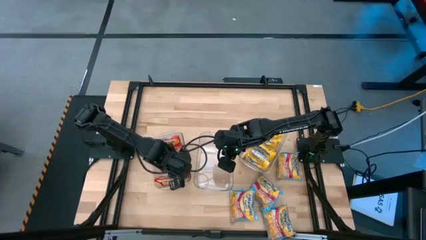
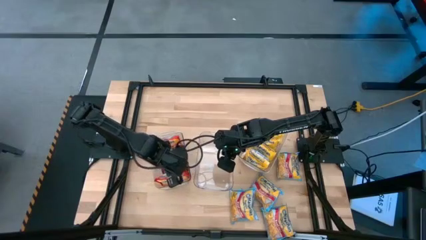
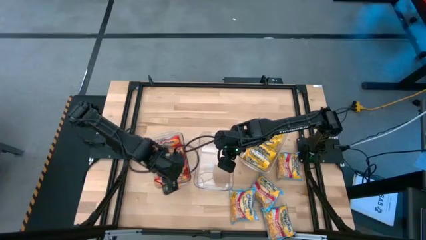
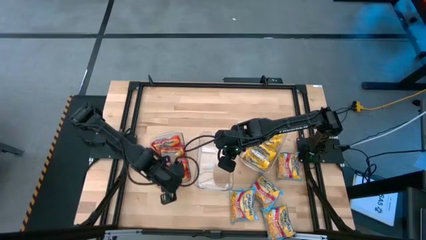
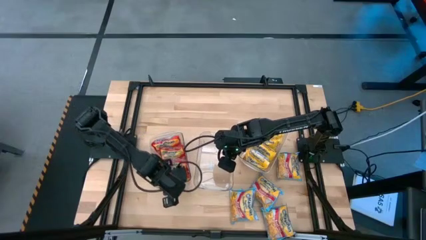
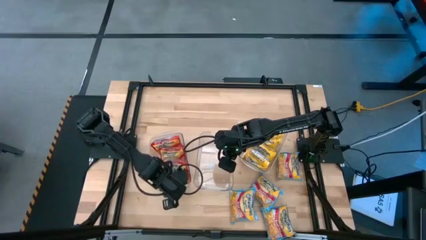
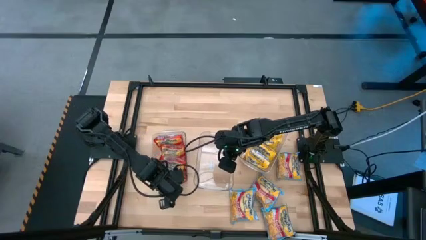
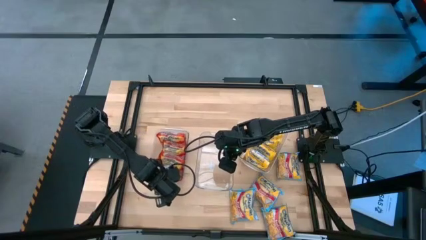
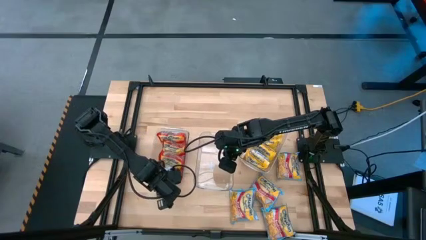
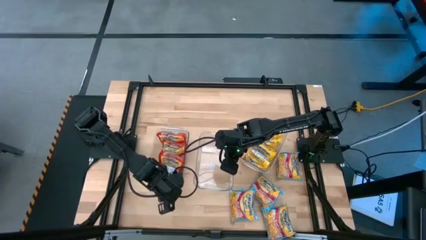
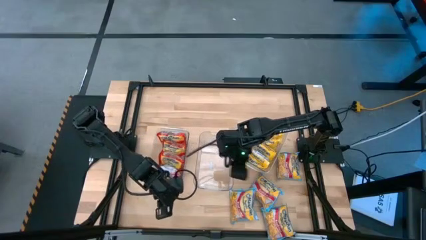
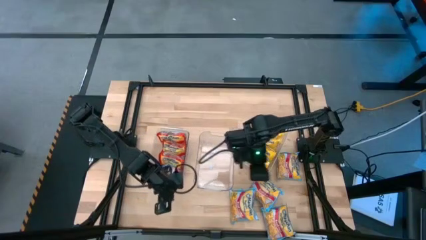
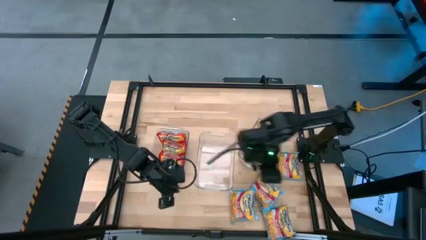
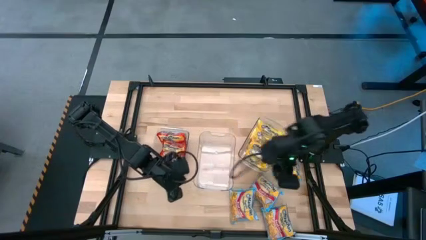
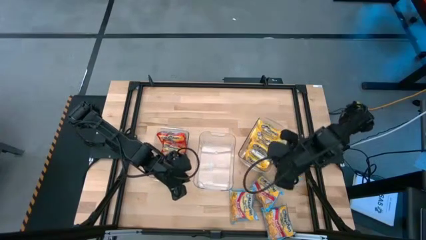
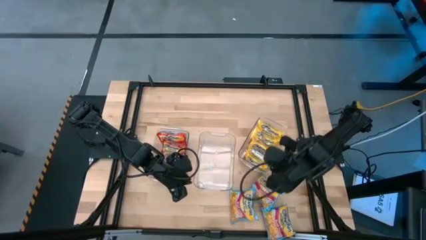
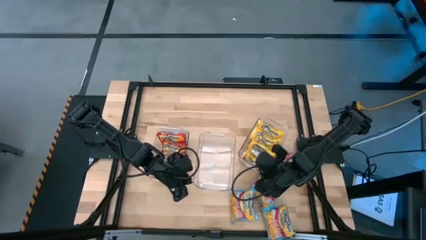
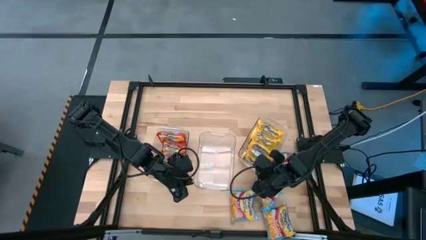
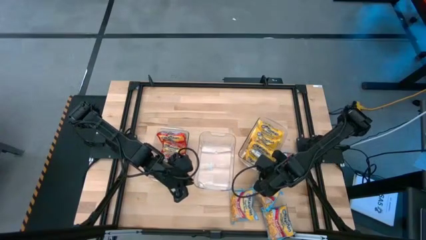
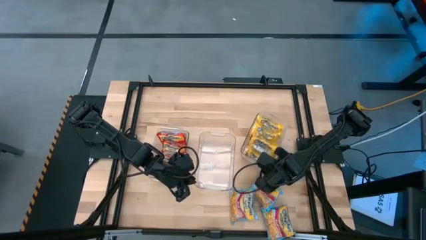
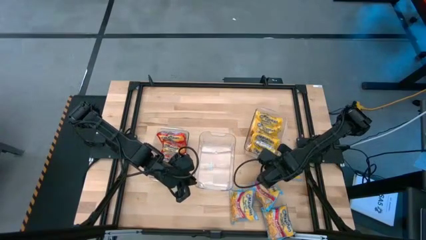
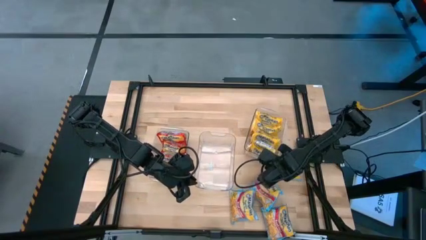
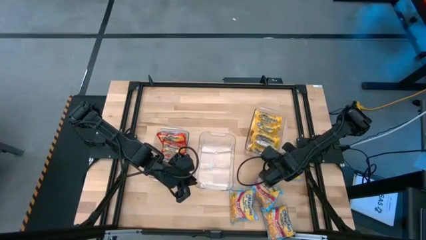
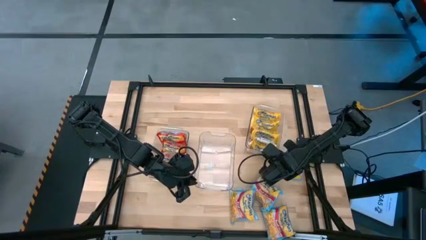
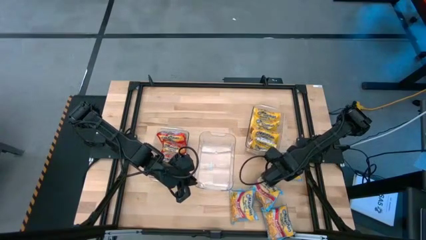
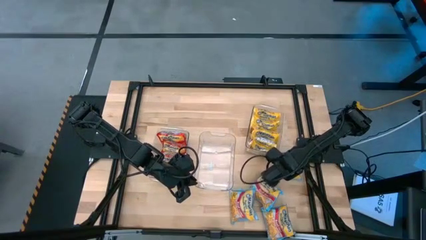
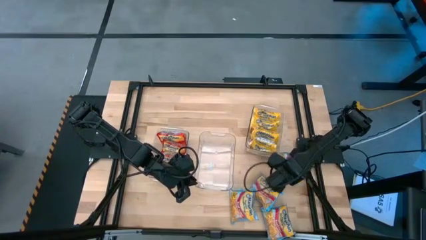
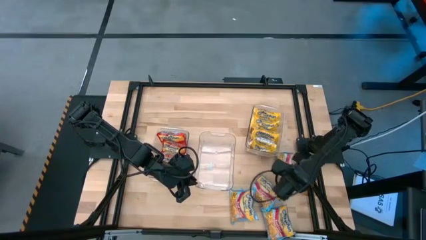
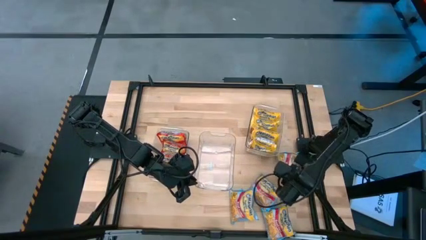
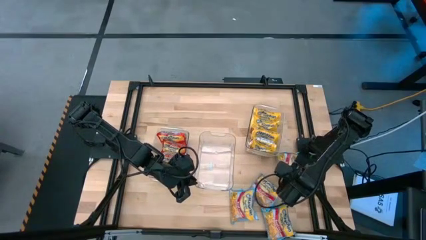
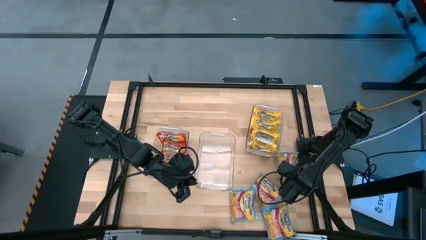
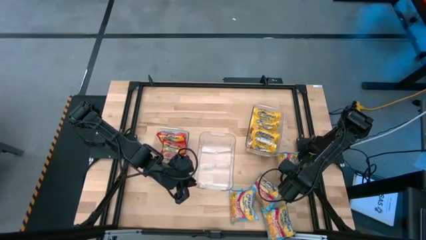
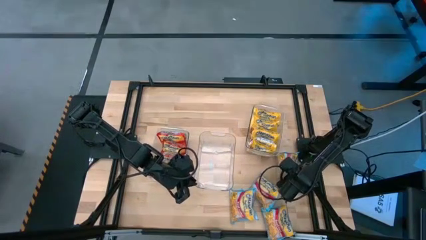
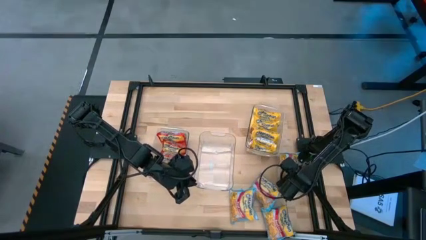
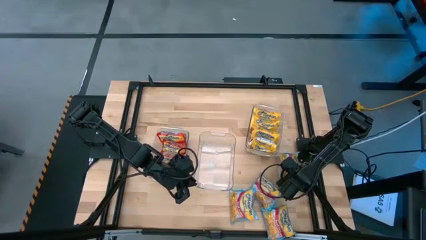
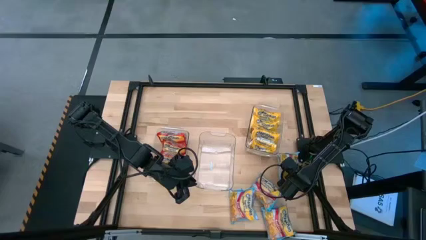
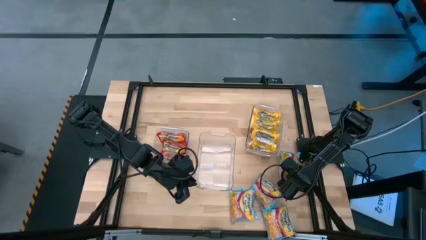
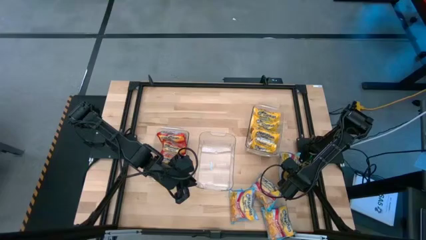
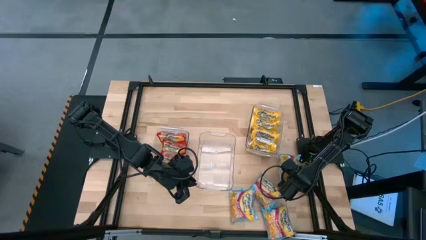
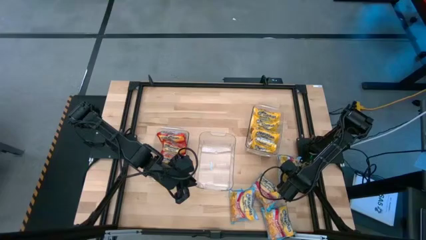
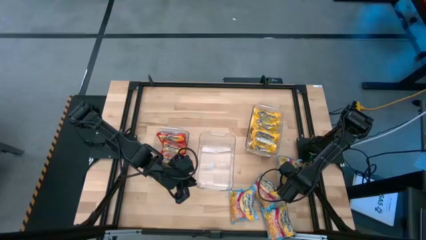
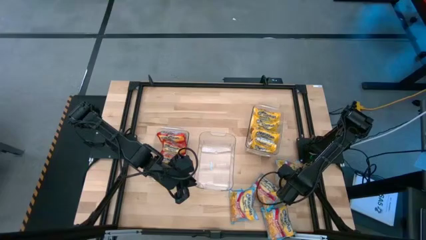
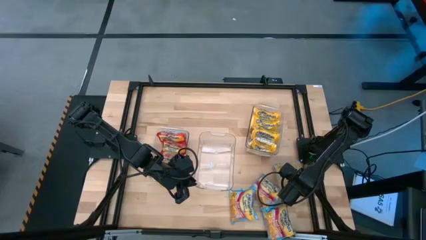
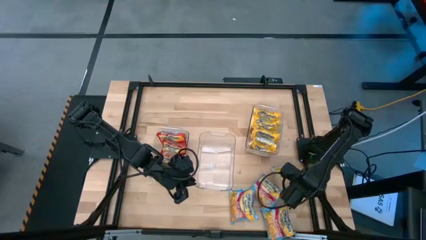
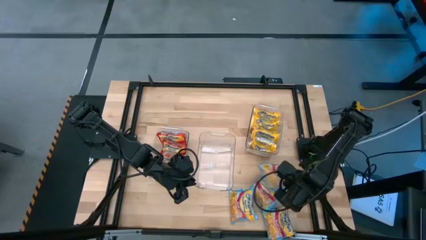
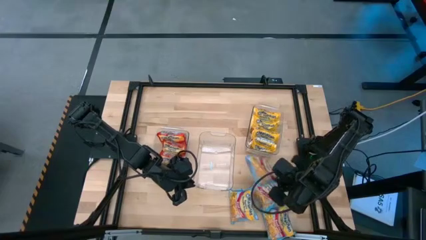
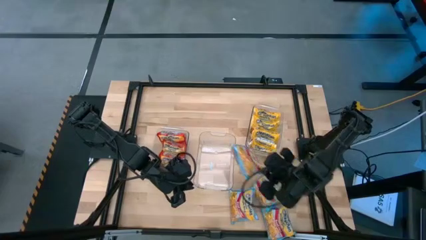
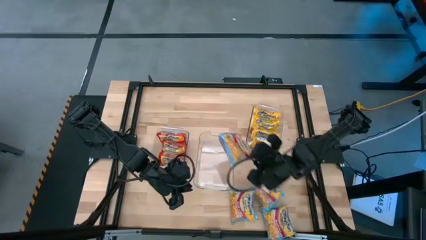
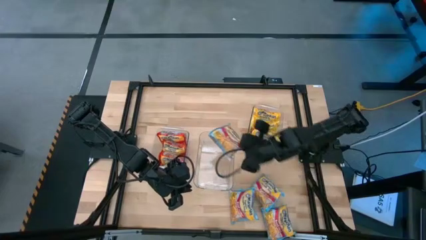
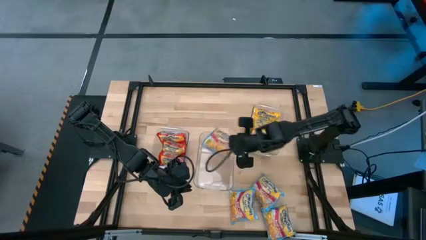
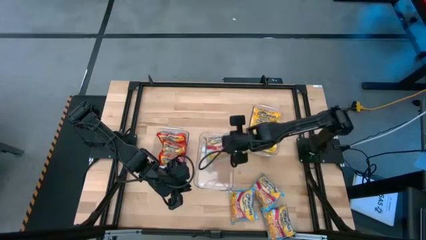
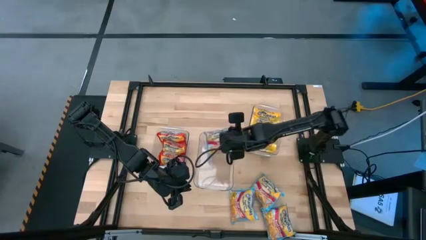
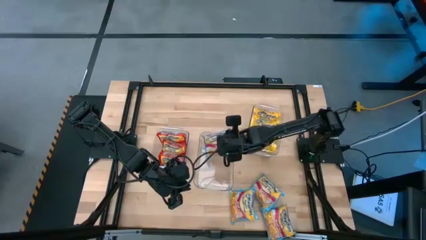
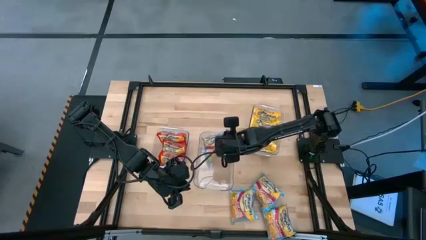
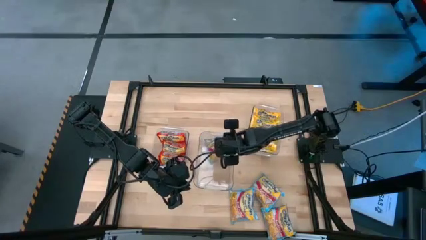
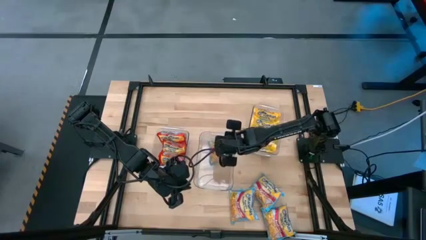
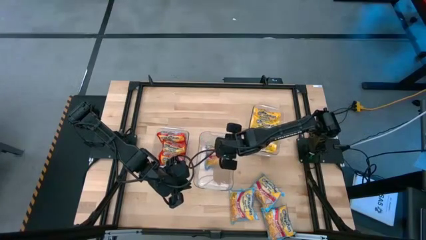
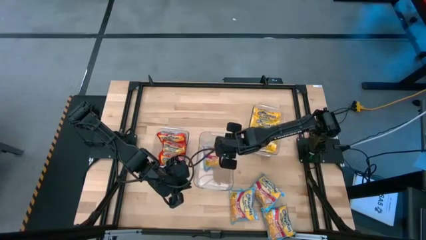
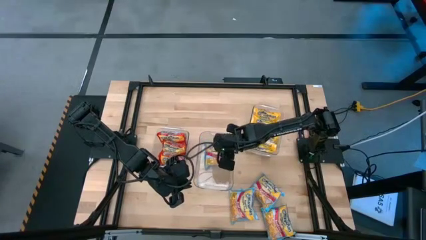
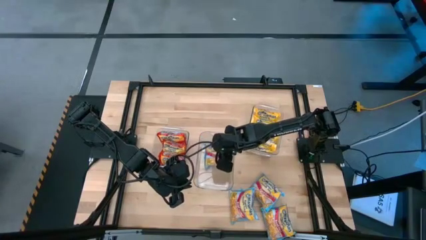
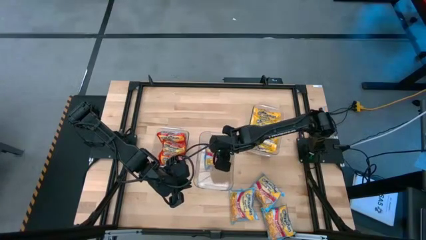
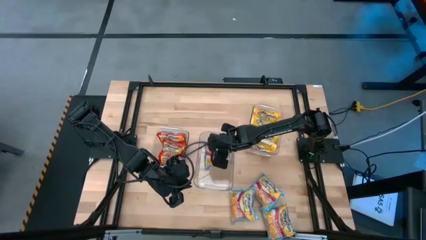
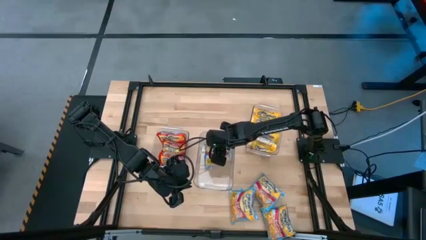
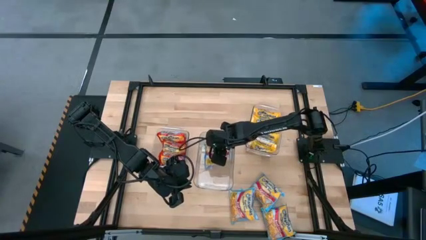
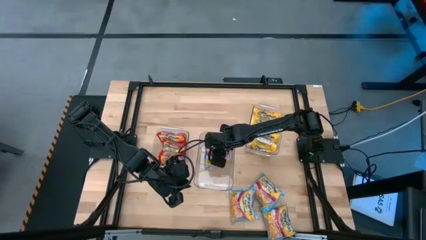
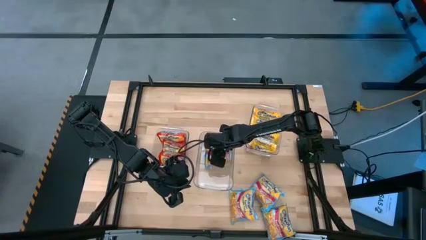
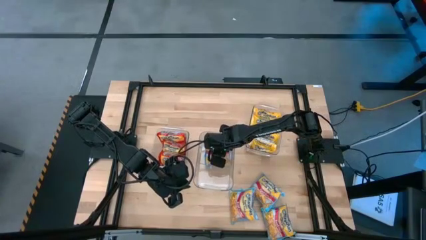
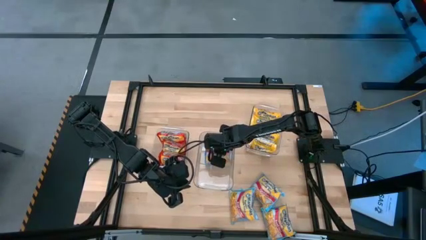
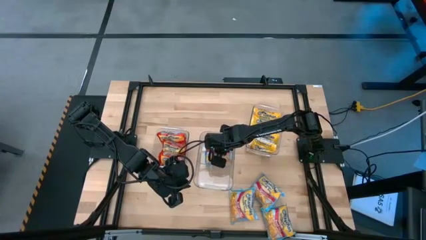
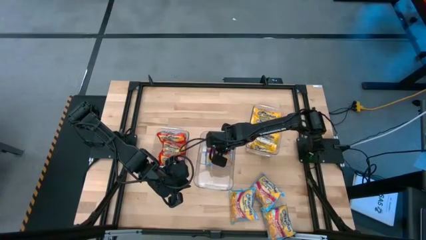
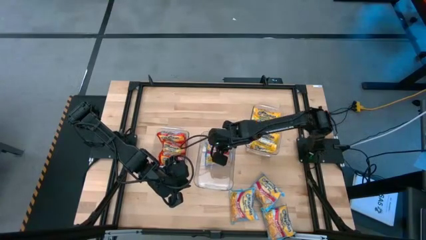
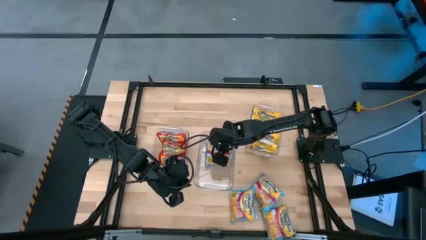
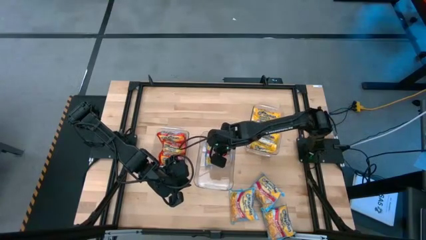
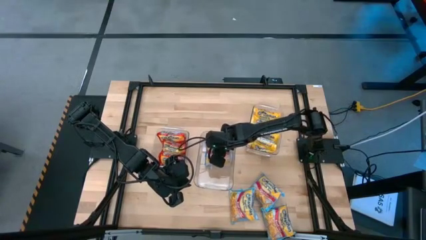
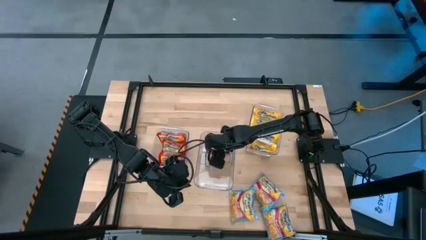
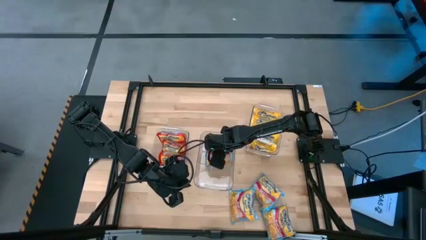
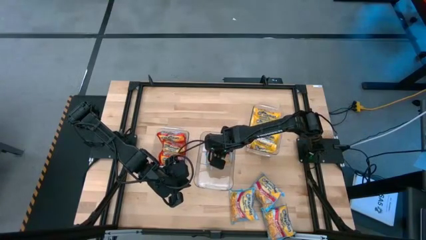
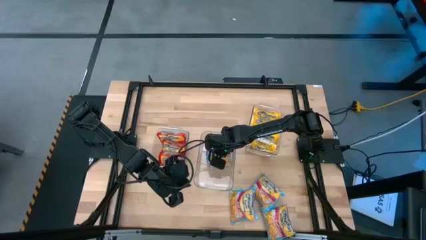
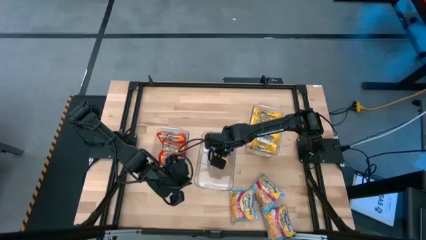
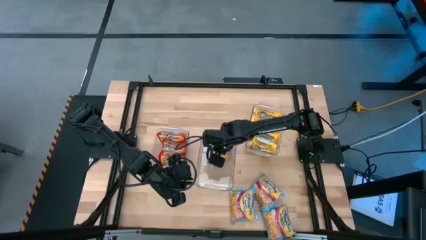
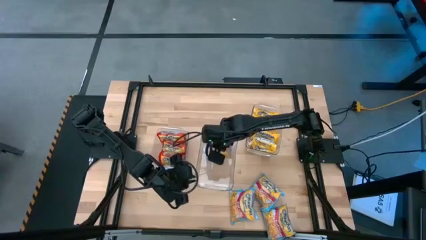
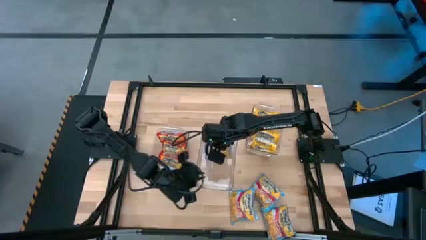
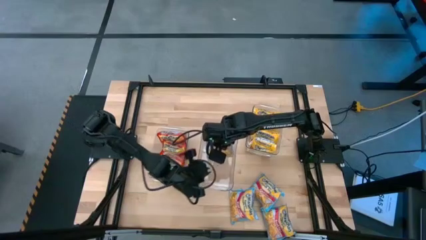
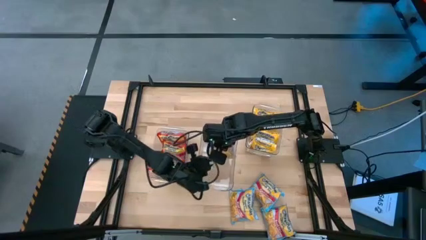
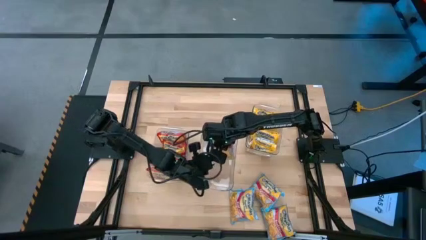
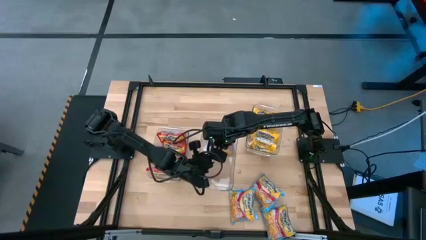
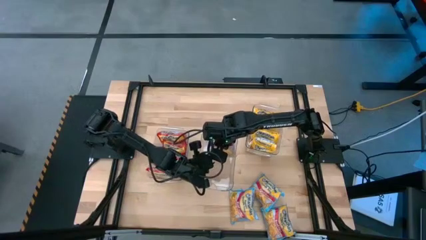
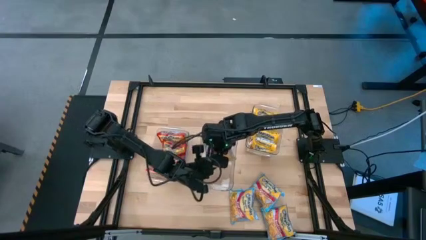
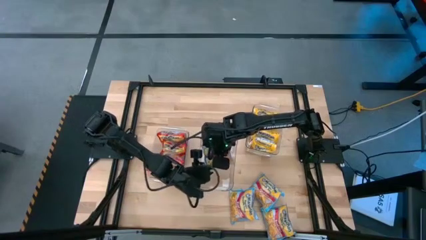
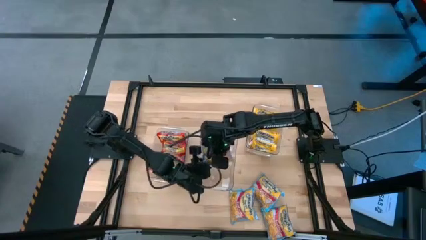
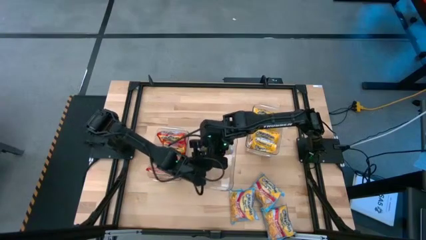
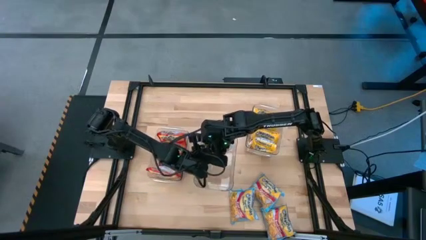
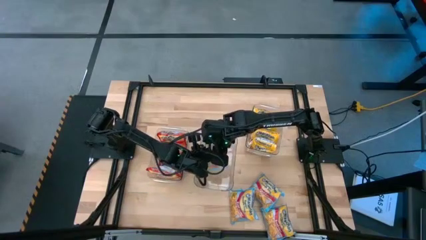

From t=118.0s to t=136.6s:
Task: Sort Maruchan noodles
Put the blue noodle pack into the middle transparent bin
